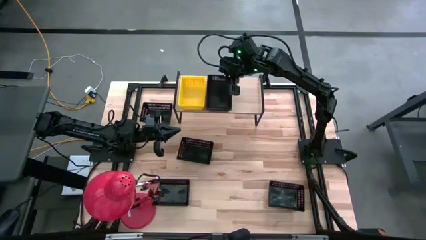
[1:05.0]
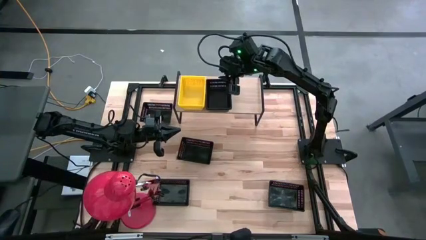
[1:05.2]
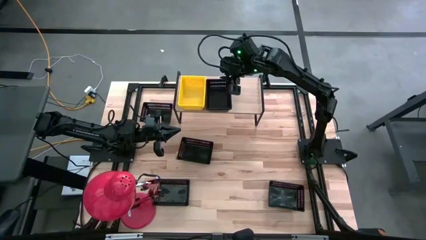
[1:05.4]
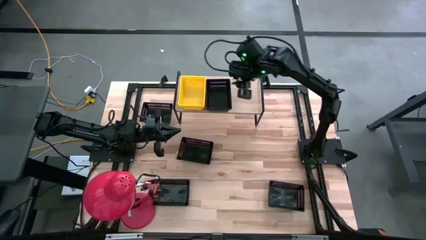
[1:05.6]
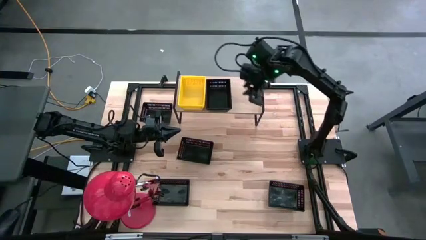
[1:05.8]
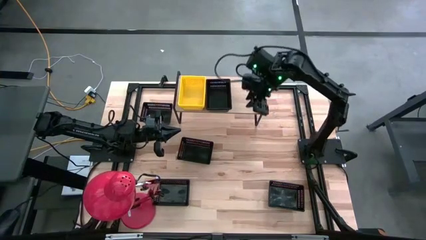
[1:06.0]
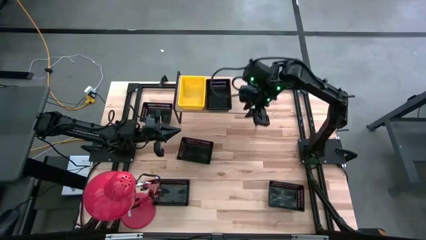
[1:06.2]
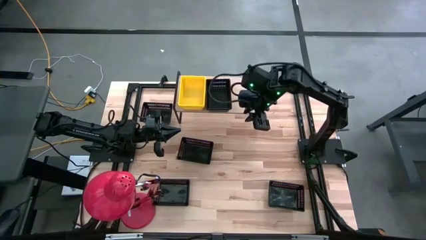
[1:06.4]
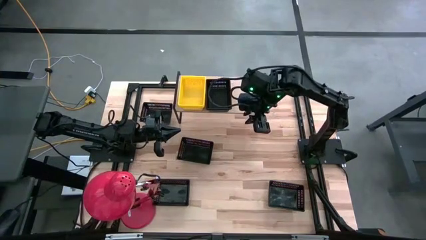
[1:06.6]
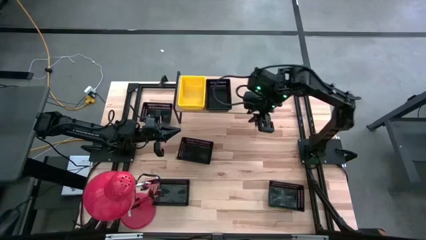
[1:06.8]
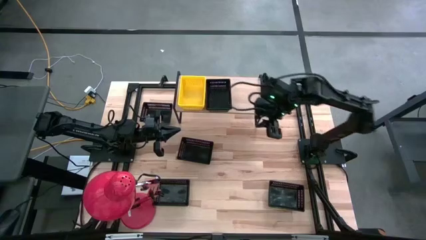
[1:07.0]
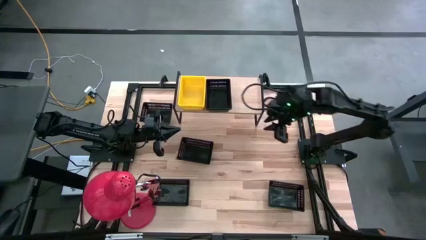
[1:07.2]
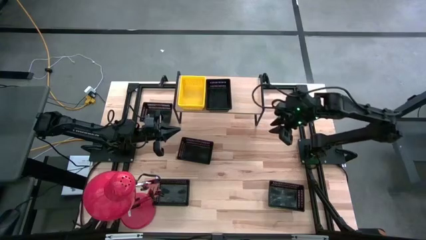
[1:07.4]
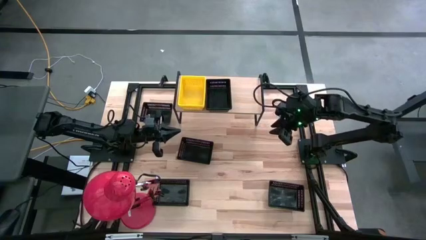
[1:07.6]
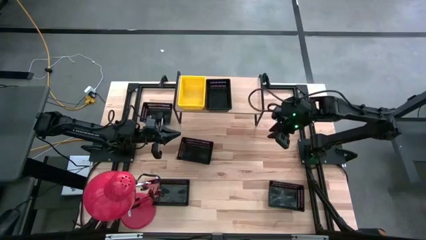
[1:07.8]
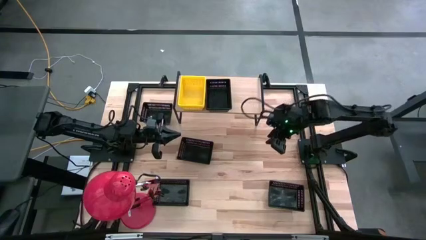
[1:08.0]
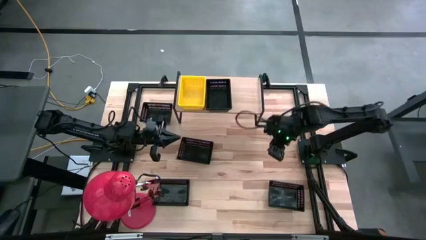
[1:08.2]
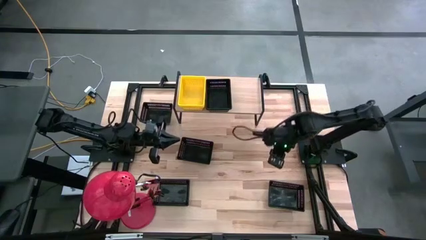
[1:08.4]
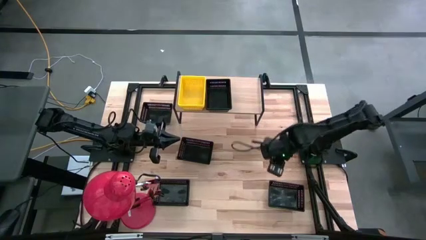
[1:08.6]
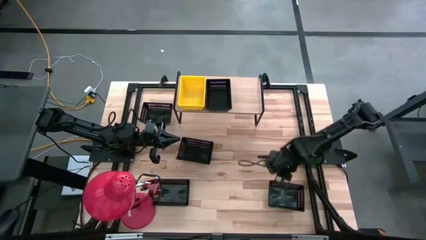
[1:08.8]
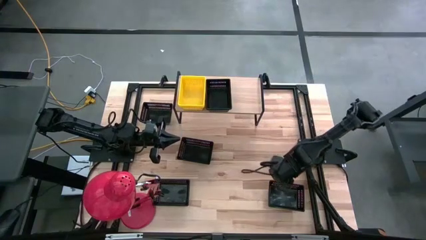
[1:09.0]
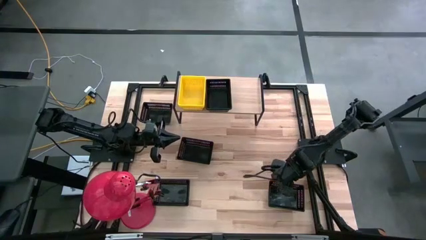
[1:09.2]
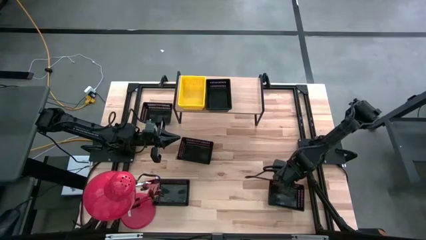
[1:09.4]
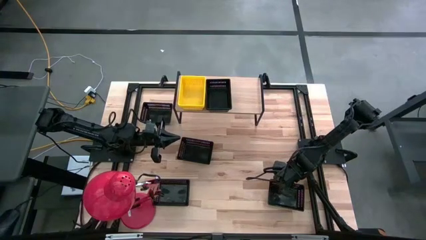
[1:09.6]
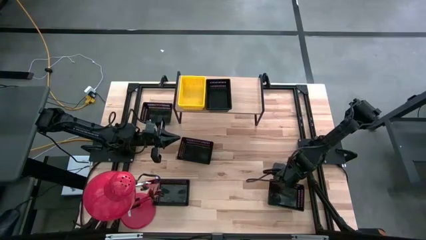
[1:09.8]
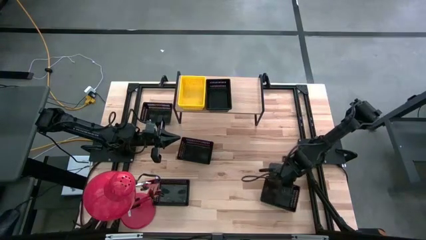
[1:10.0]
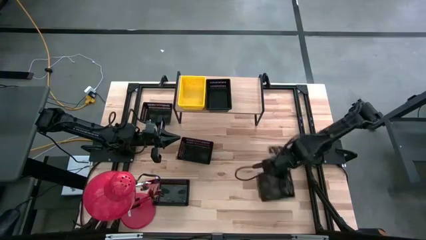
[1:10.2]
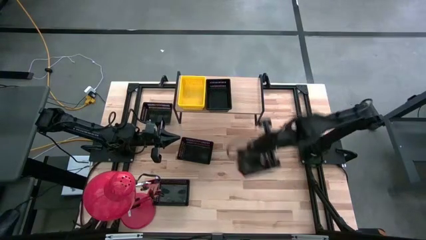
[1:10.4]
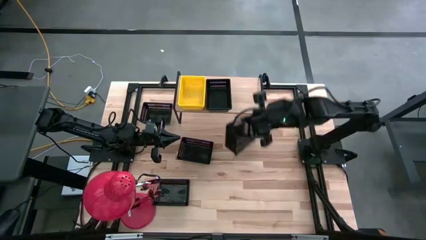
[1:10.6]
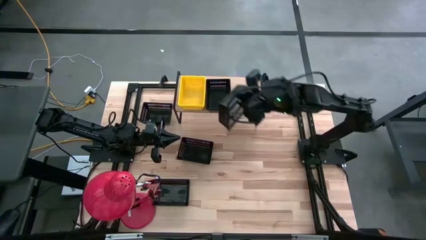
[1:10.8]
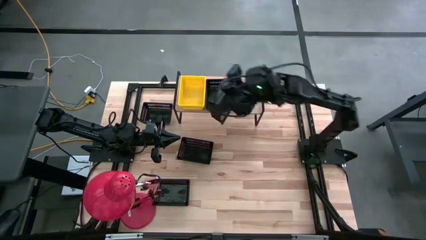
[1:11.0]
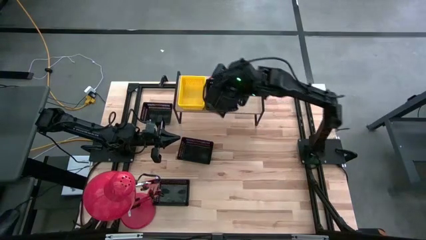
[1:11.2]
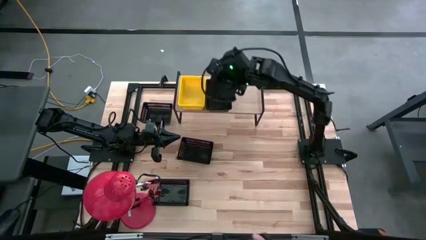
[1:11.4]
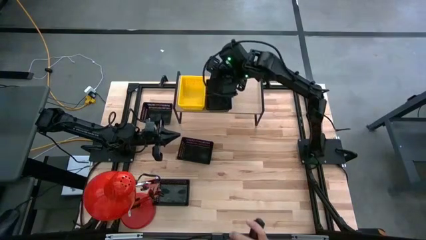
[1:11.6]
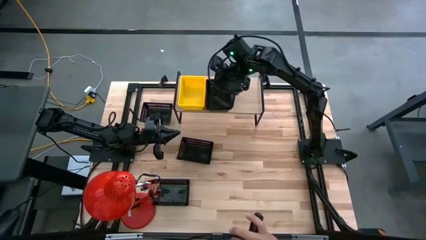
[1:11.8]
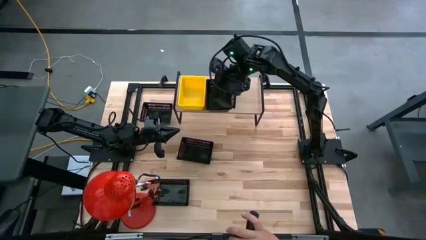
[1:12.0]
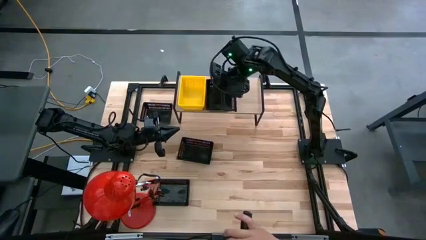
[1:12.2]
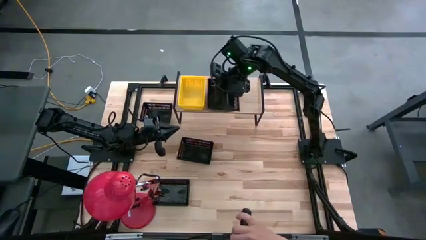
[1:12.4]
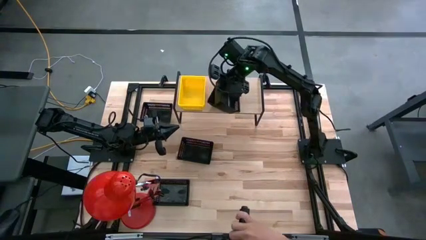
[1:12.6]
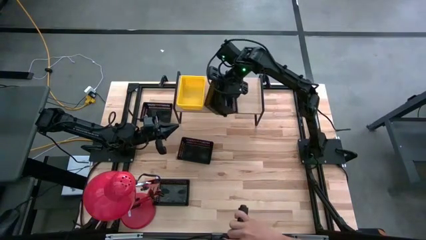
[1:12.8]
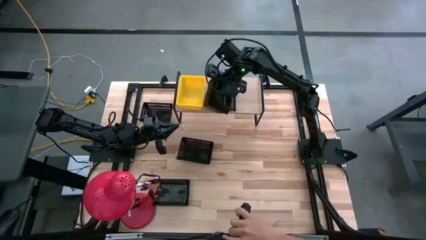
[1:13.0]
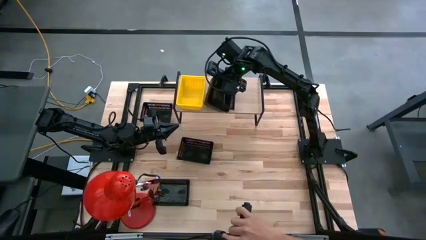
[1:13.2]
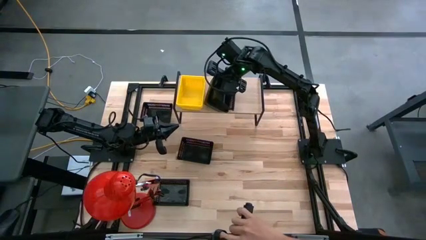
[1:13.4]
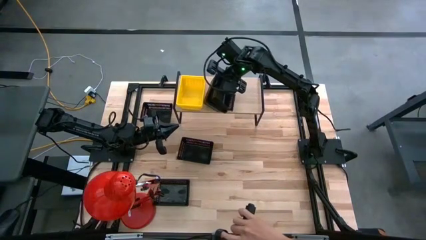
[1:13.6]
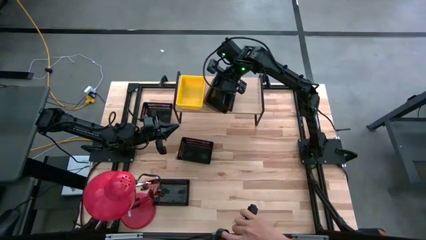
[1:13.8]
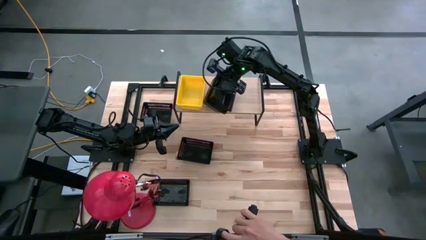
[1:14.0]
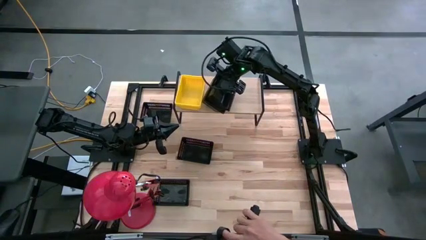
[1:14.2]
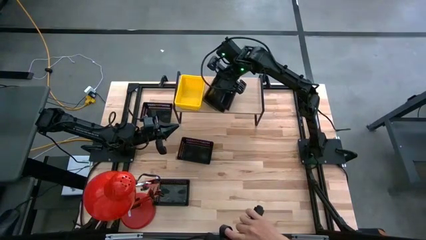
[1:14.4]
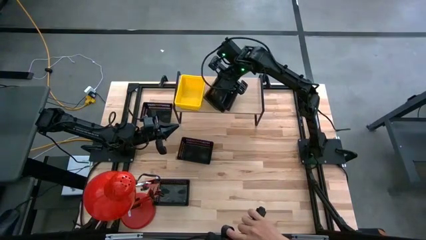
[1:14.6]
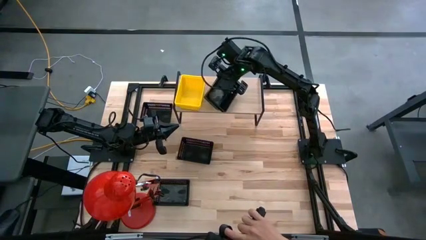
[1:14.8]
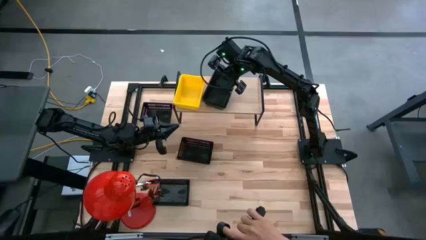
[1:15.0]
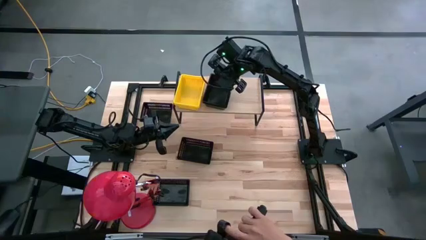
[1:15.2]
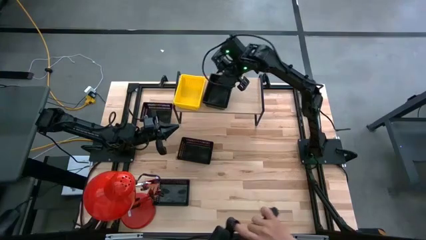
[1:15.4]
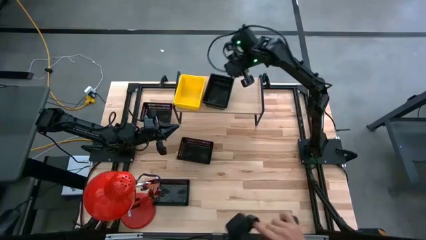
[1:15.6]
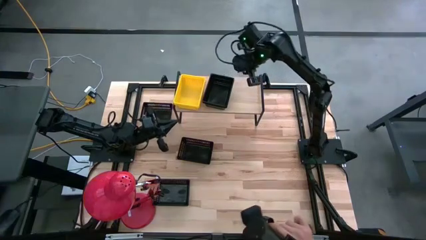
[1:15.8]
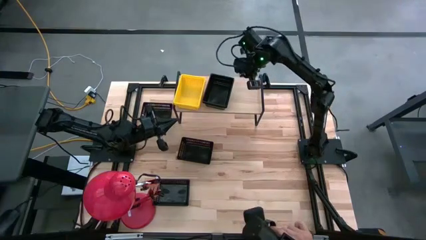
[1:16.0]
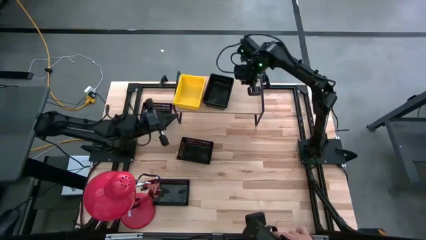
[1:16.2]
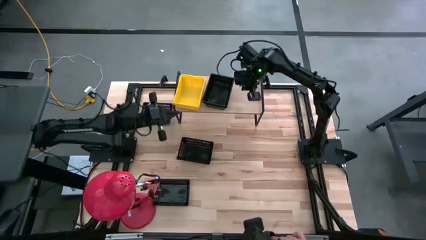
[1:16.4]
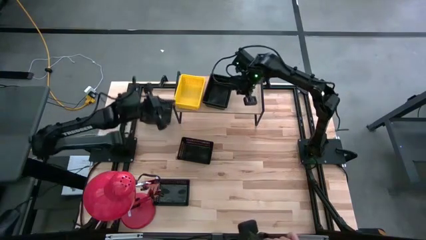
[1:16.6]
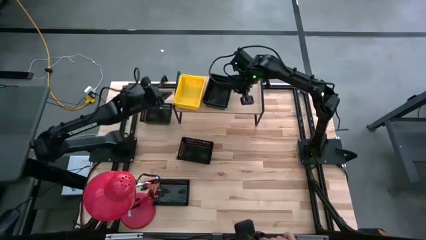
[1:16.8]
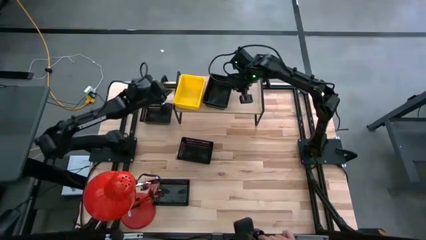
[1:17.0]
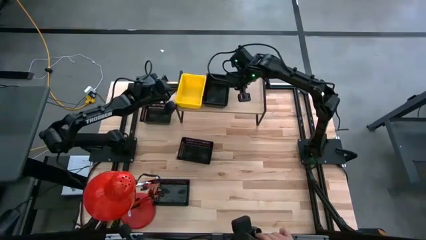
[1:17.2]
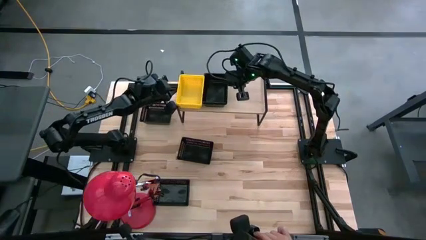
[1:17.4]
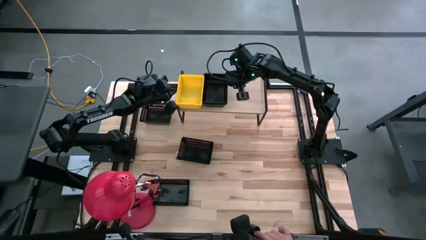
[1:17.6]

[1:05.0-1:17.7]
Task: Stack baskets on shelf by color
Stack the black bin on the black bin on the shelf
